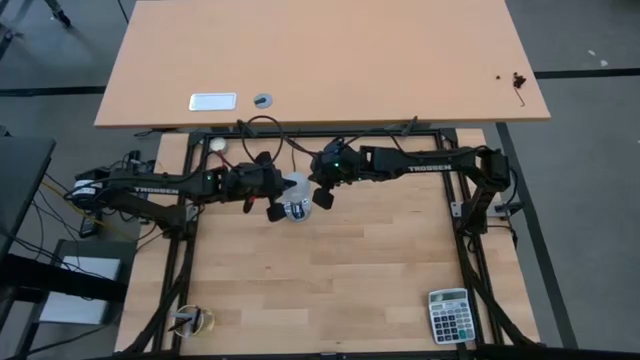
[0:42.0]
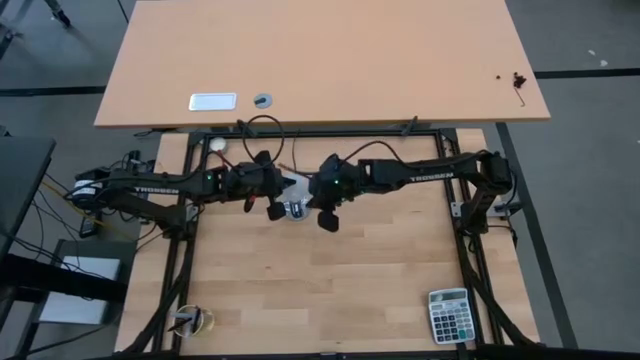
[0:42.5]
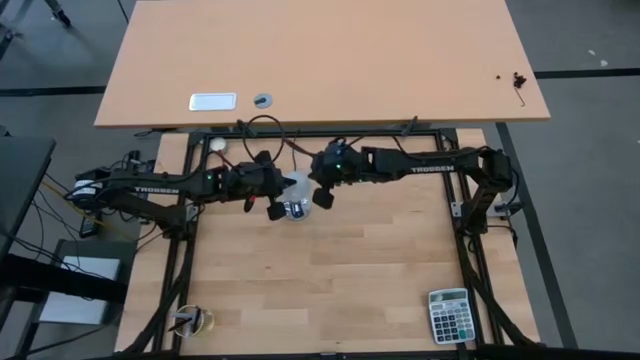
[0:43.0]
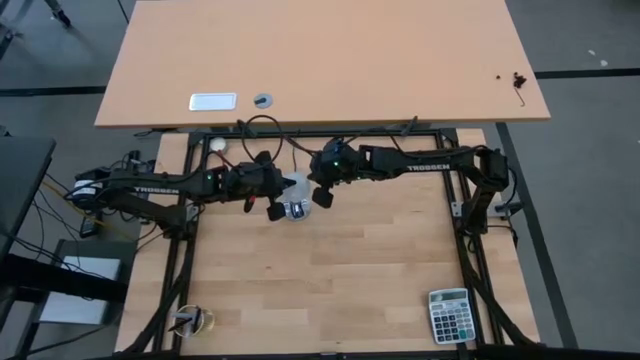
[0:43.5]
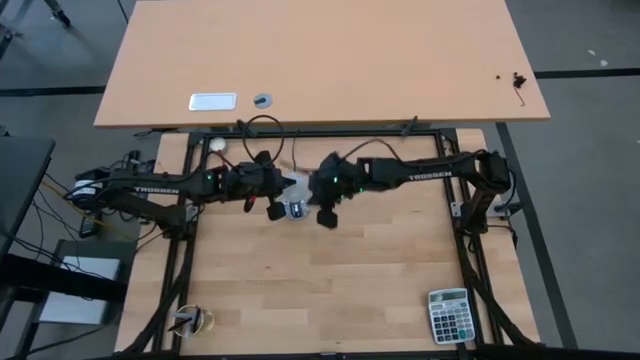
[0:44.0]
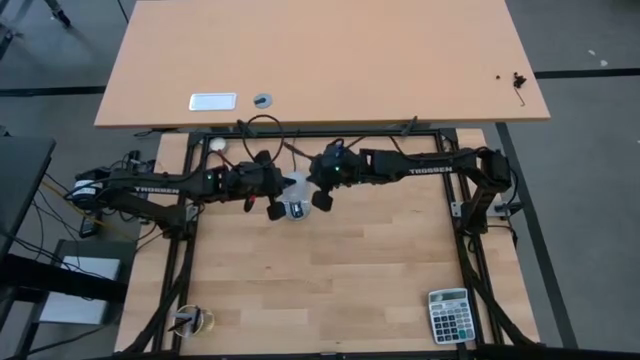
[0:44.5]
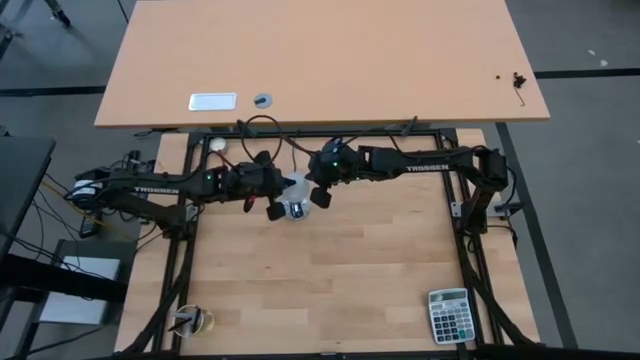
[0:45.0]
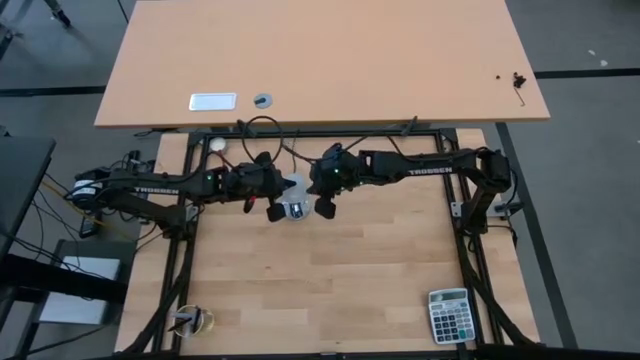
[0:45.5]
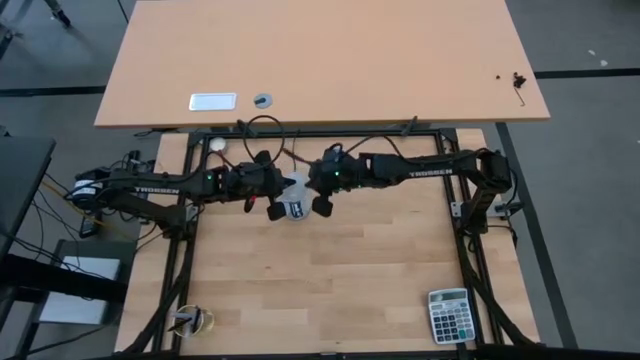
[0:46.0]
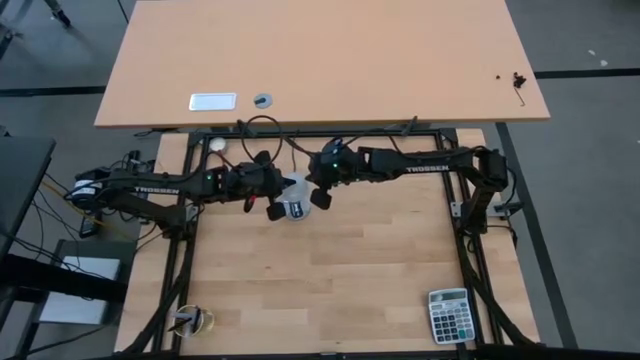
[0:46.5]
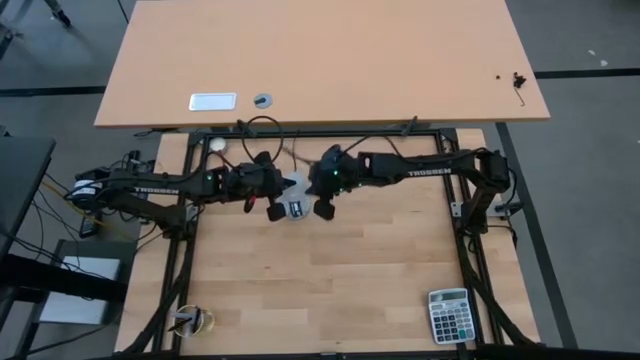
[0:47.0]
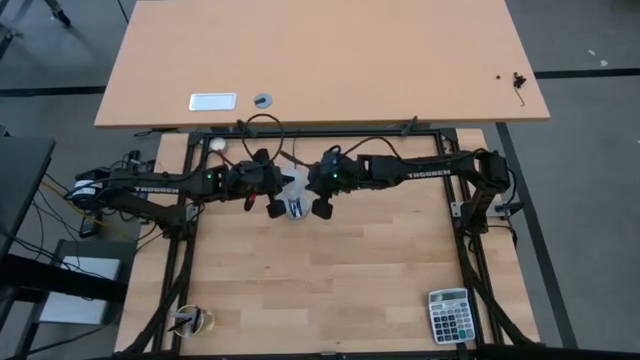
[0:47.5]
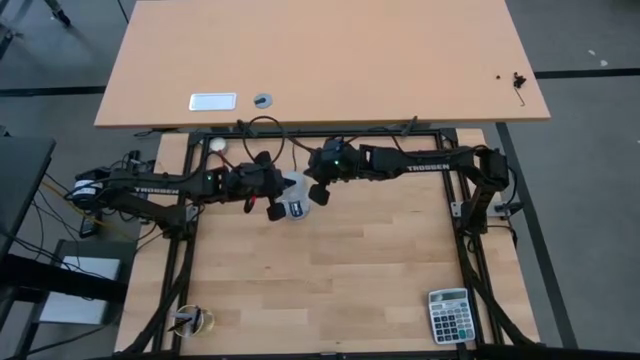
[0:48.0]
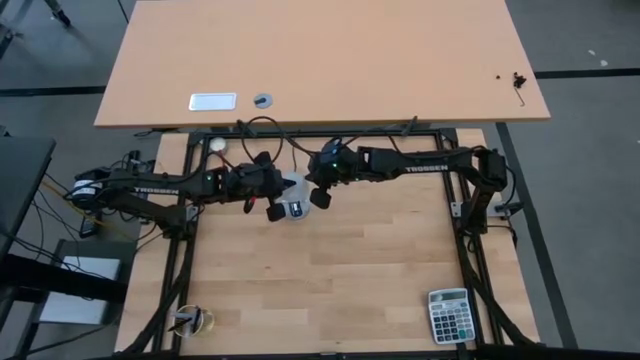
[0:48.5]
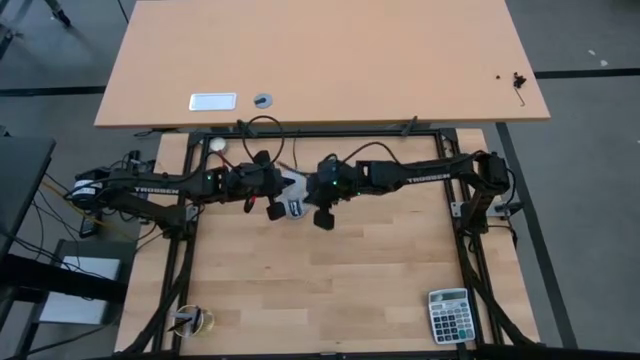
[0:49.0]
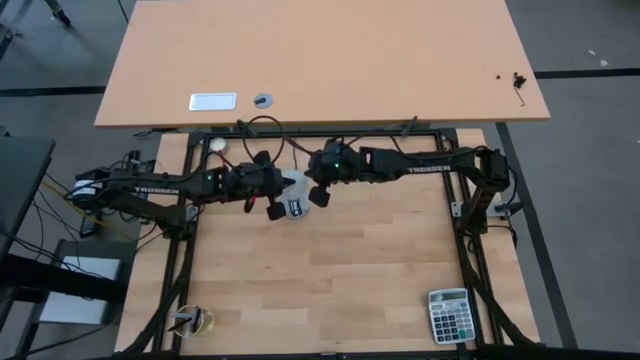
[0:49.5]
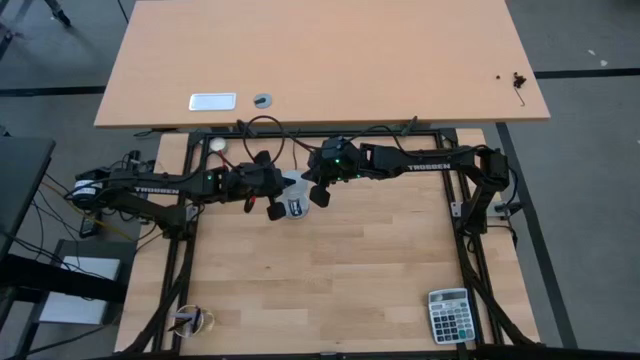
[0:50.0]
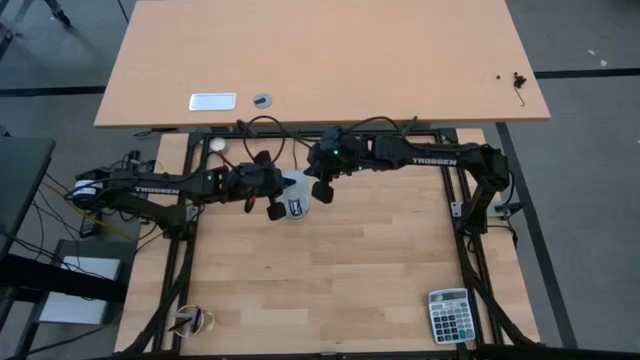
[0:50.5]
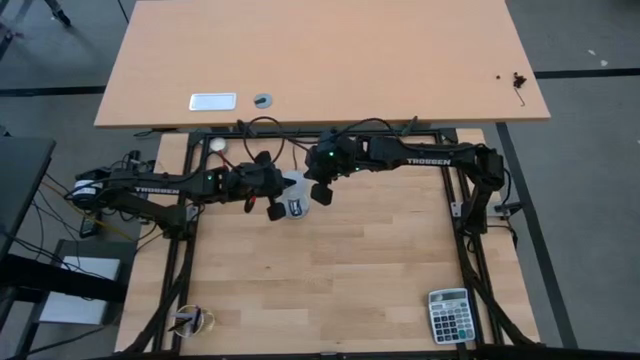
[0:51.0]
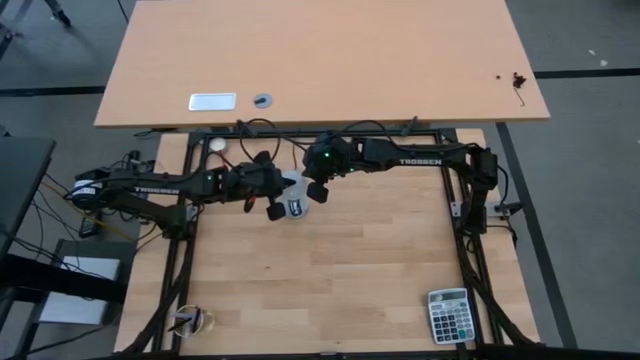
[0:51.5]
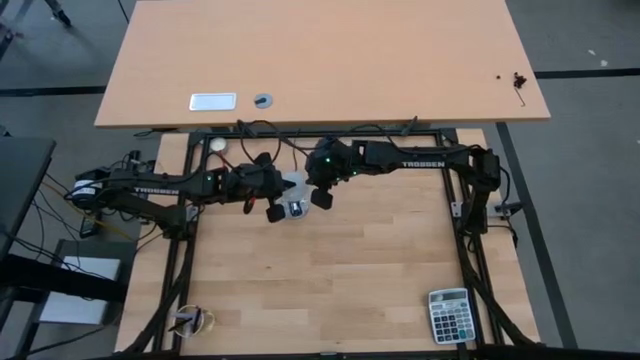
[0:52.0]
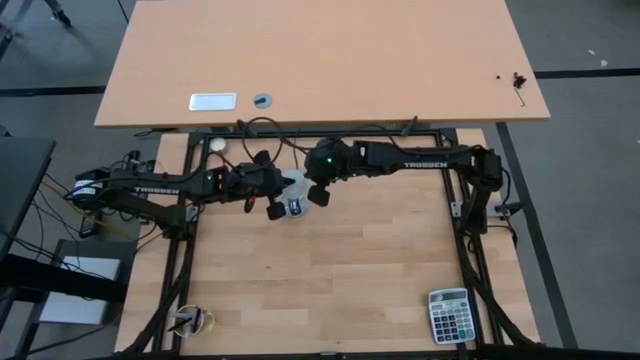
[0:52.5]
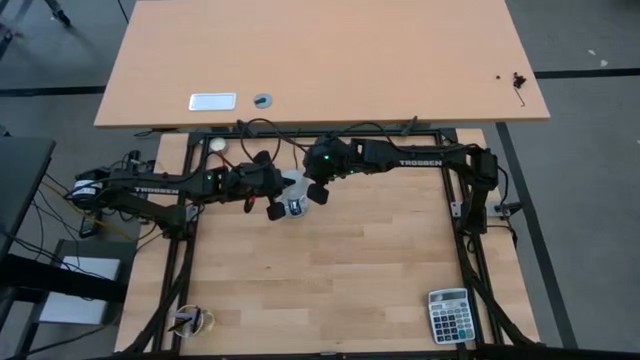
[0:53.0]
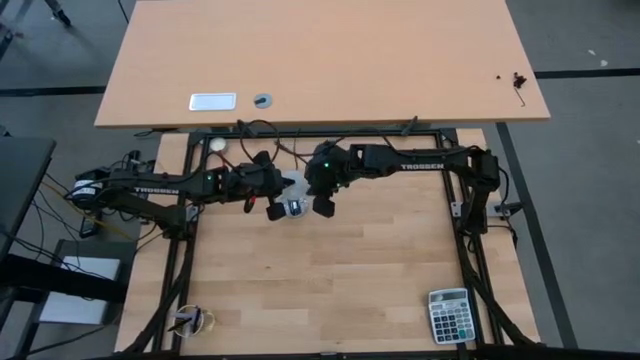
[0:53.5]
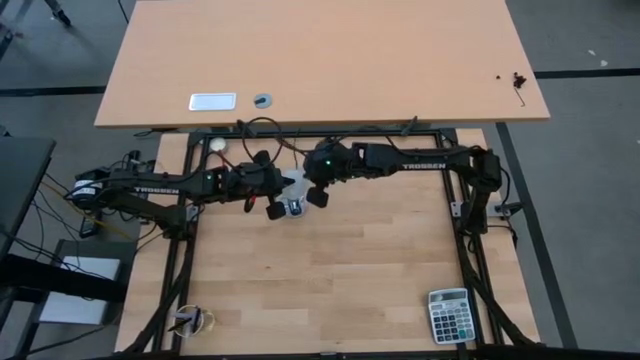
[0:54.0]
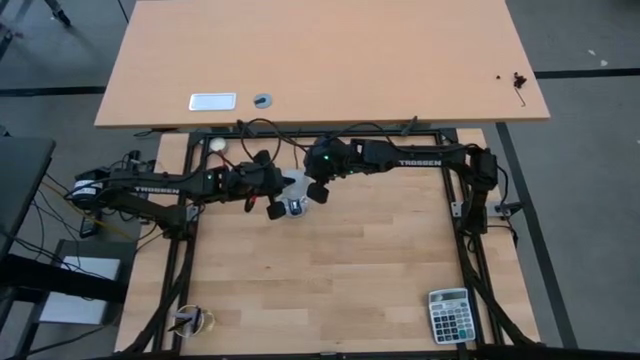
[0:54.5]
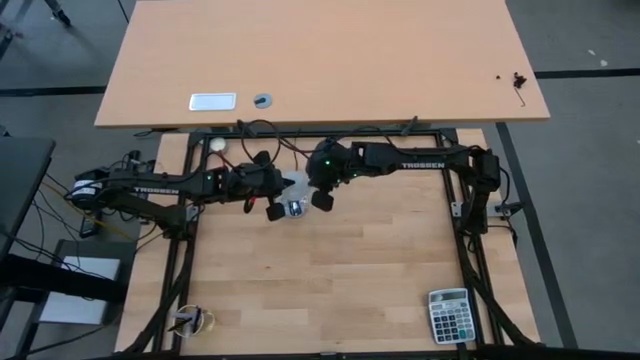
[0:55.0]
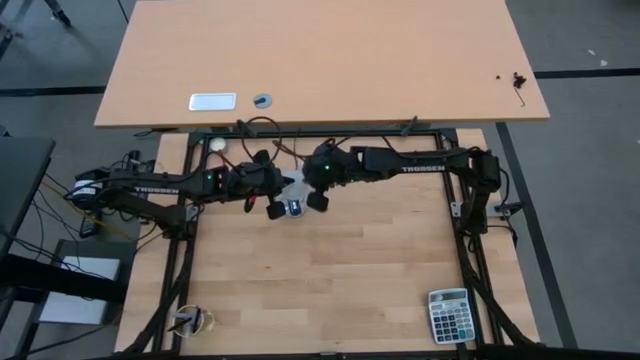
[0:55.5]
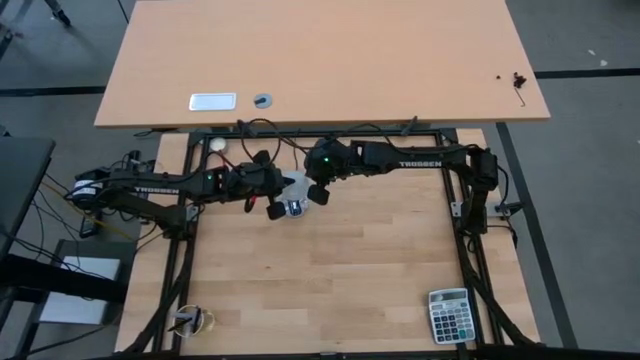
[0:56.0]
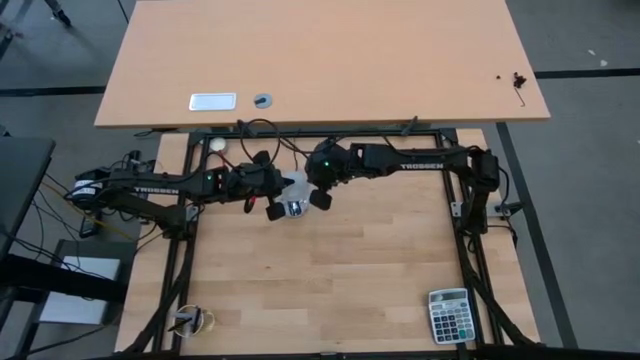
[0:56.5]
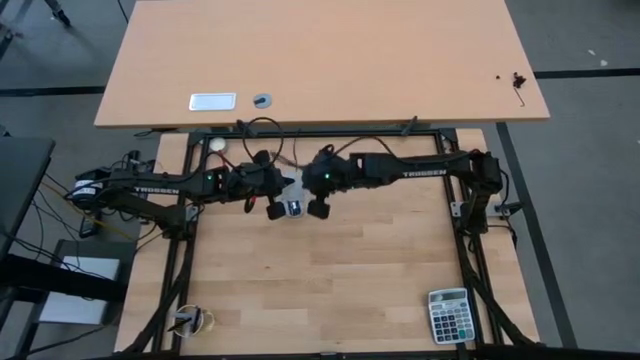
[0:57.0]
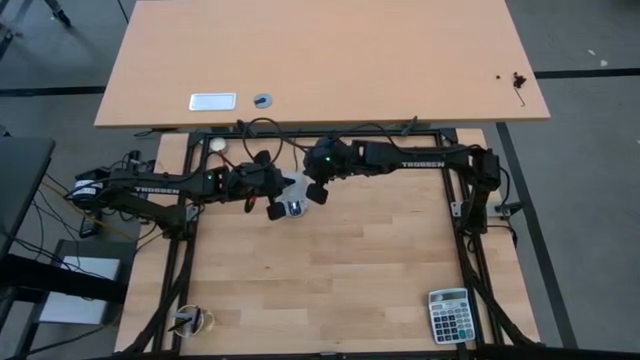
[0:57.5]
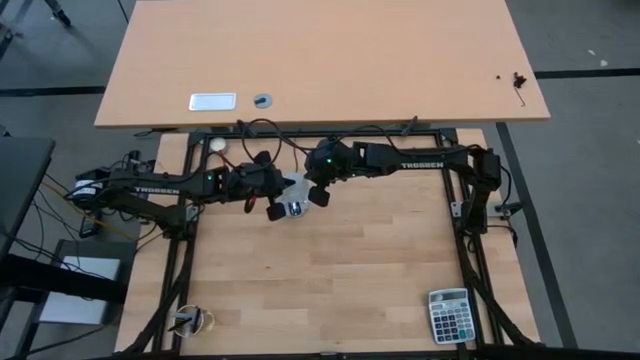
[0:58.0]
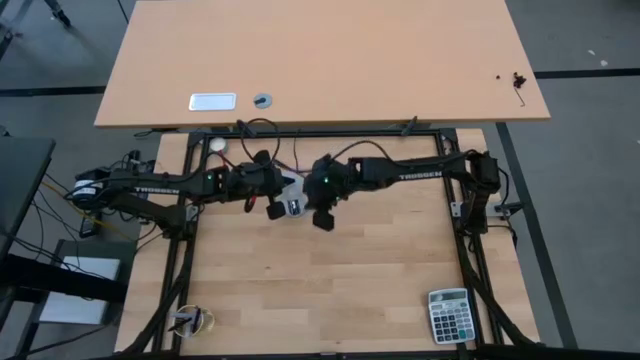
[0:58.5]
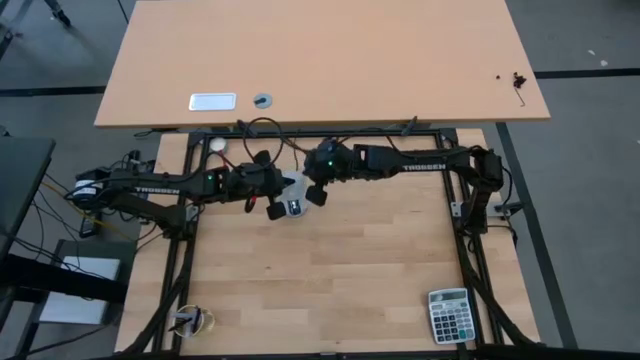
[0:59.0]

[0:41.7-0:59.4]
Task: Screw lightbulb
Insert the white light bulb into the silver lamp

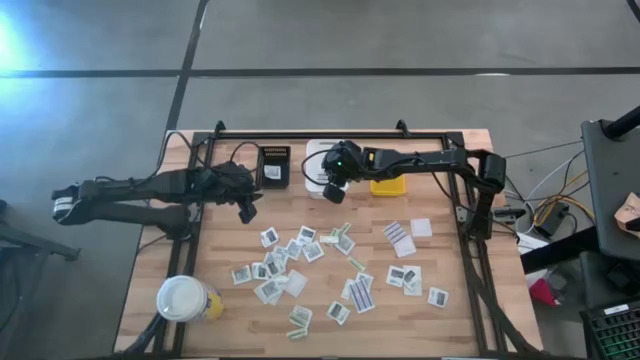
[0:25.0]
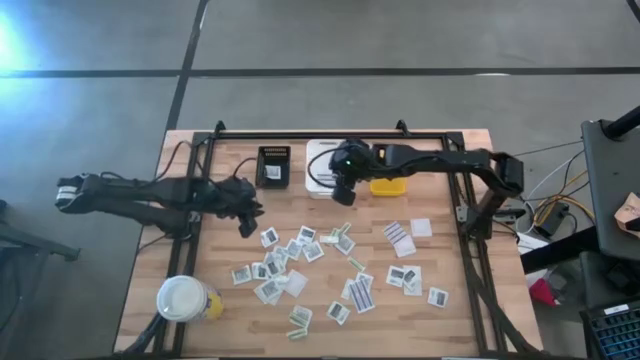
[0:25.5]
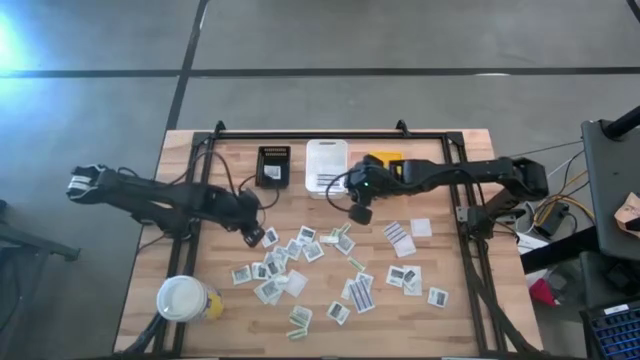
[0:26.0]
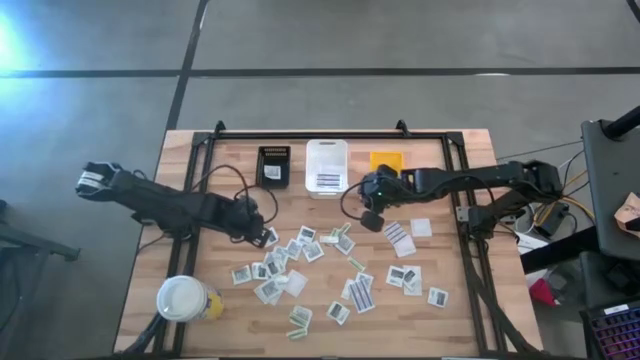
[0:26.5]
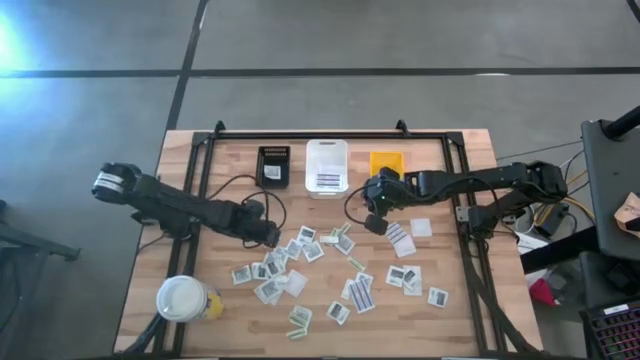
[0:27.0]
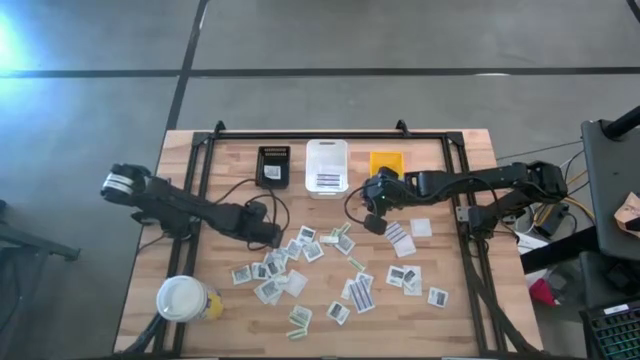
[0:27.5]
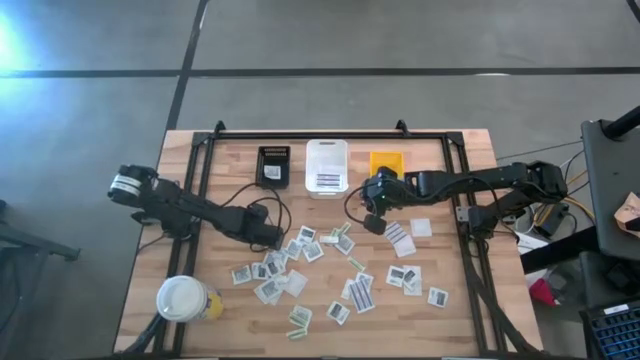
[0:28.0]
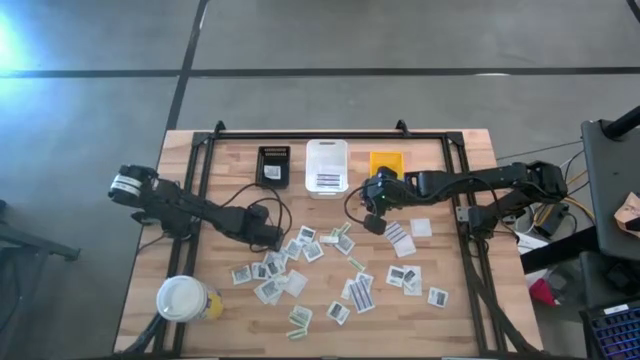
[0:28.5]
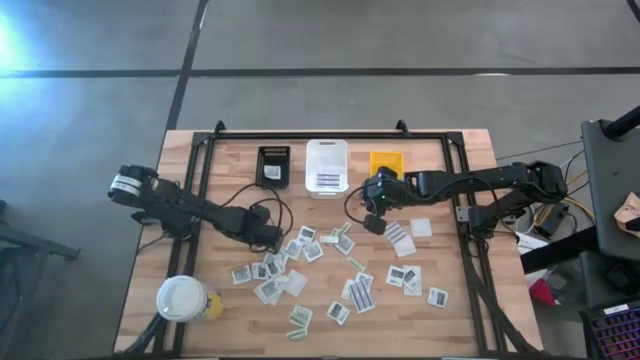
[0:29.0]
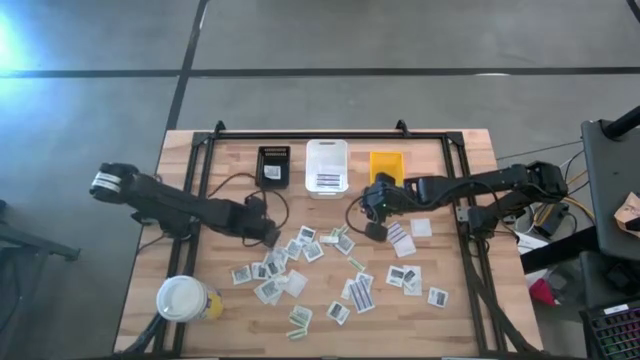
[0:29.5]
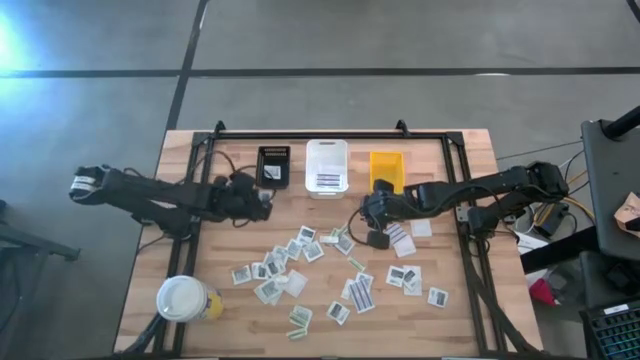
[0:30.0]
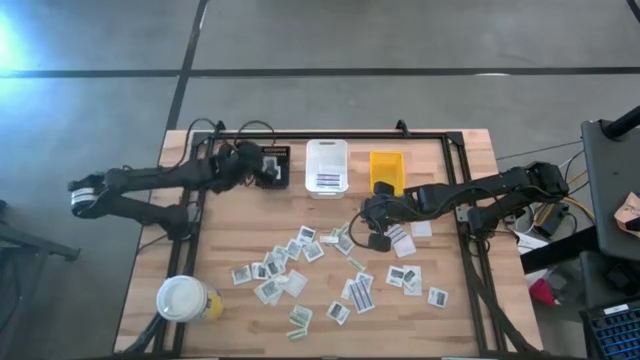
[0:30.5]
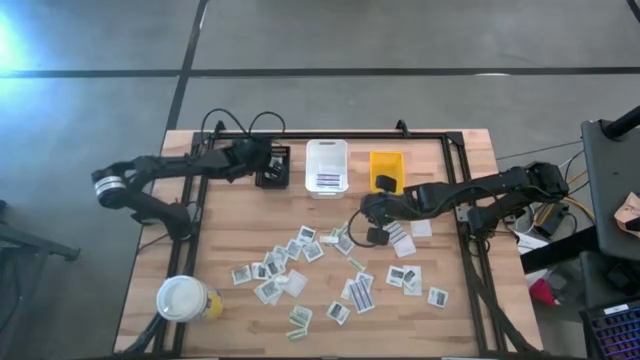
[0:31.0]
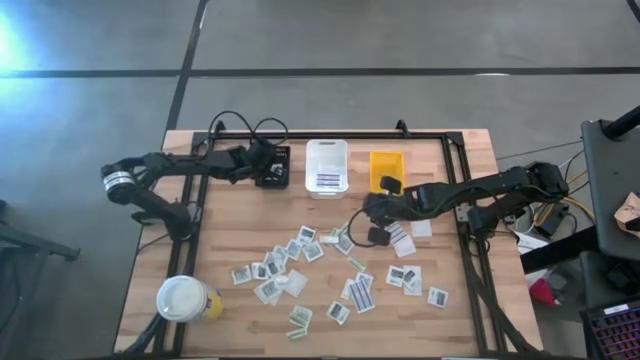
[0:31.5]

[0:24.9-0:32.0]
Task: Pick & Place First Aid Supplies
Put the towelette pack into the black basket
